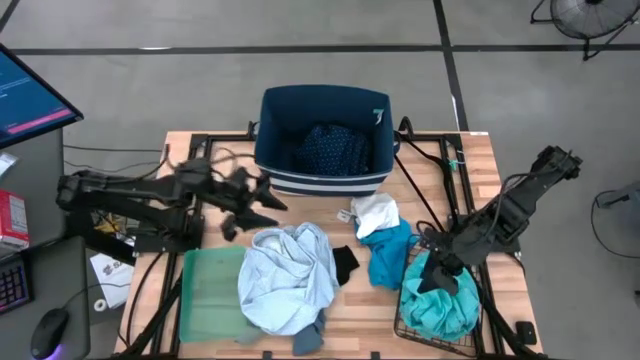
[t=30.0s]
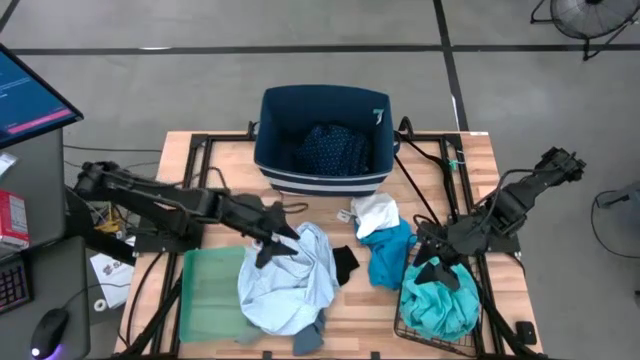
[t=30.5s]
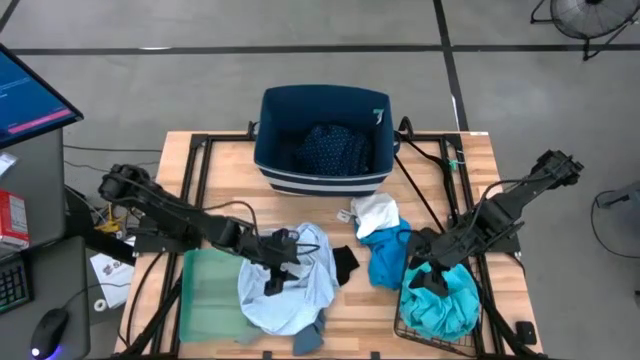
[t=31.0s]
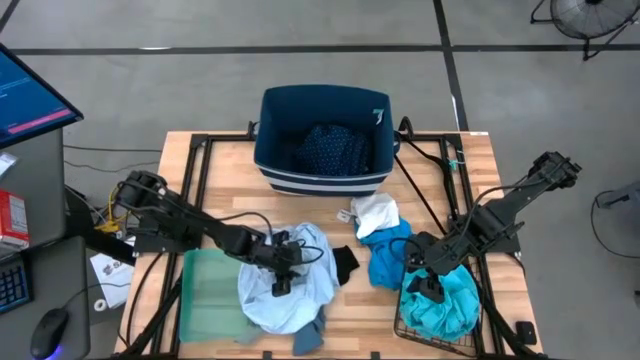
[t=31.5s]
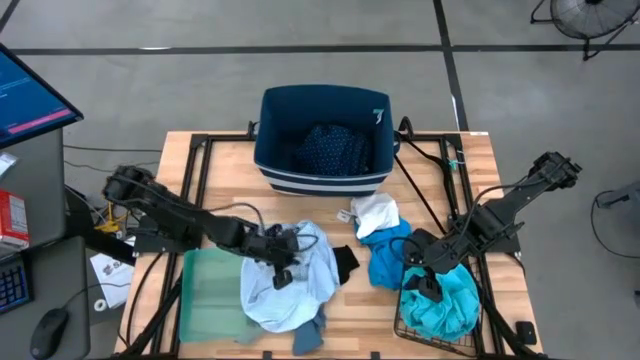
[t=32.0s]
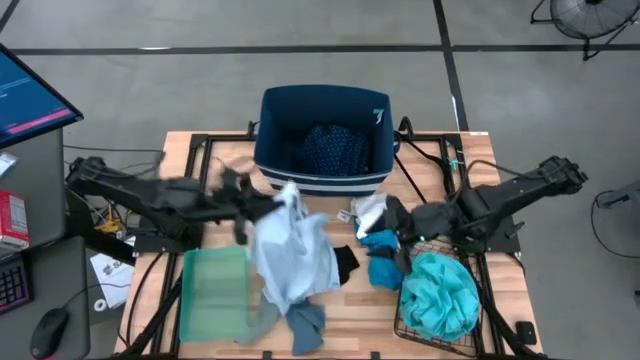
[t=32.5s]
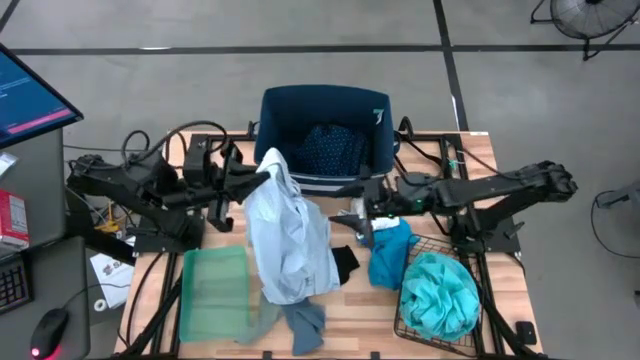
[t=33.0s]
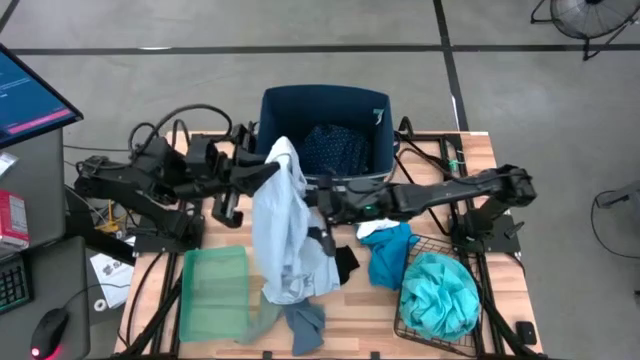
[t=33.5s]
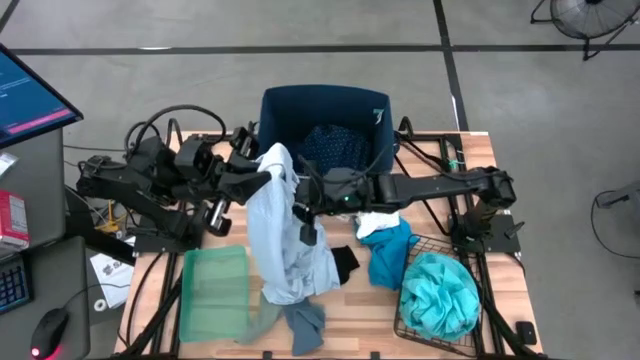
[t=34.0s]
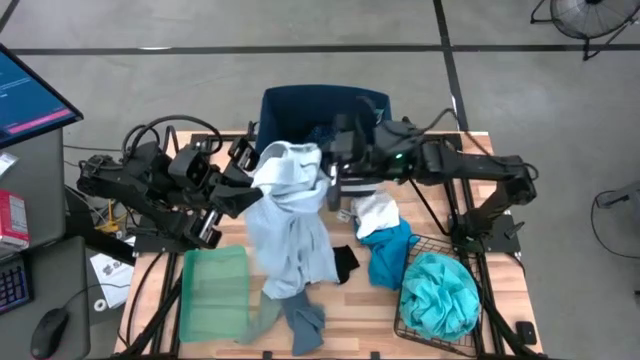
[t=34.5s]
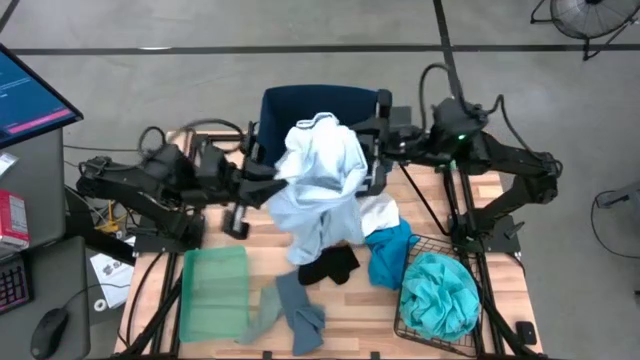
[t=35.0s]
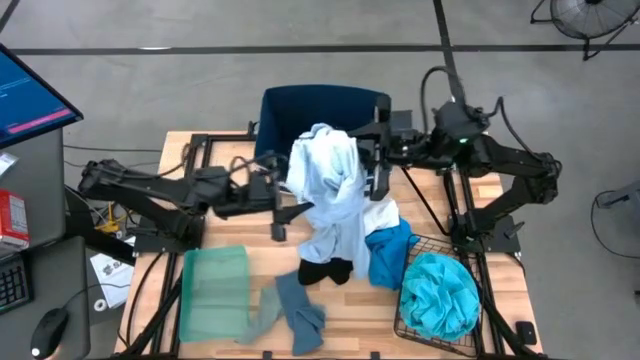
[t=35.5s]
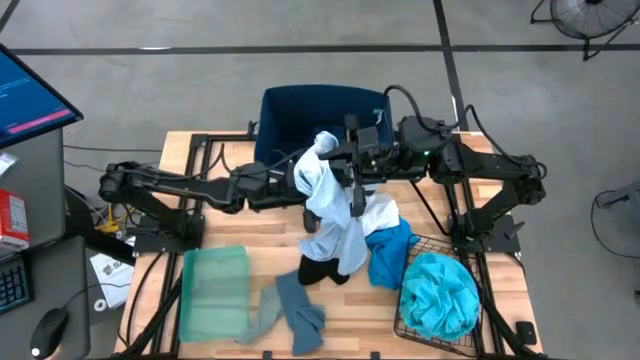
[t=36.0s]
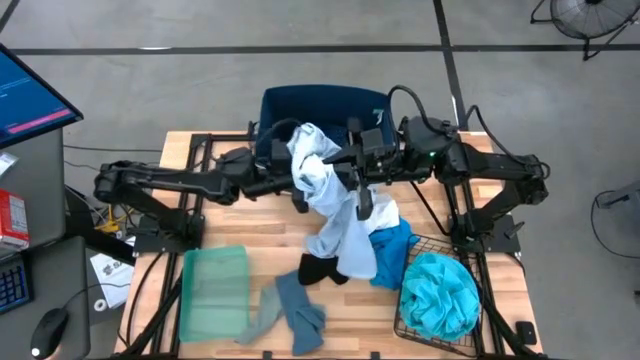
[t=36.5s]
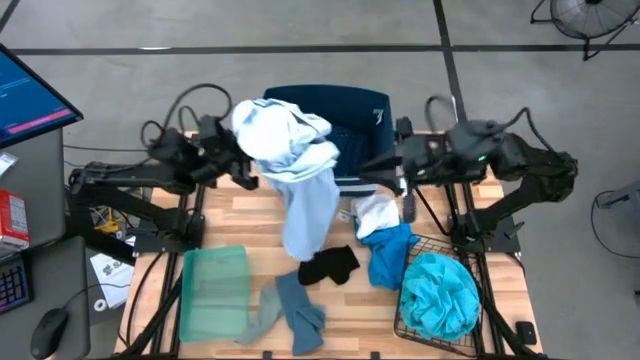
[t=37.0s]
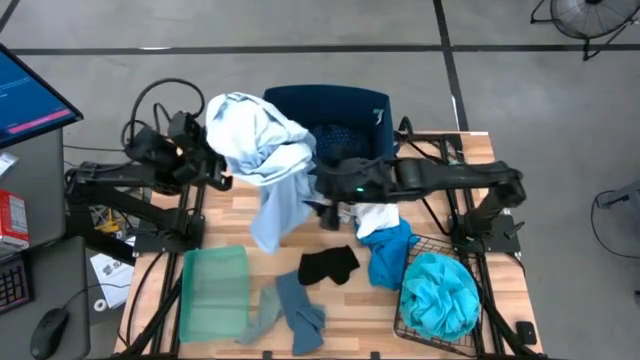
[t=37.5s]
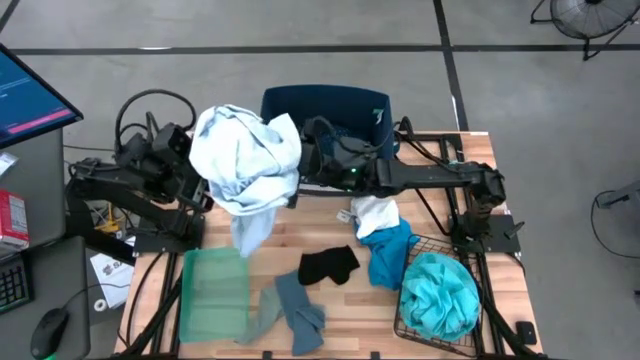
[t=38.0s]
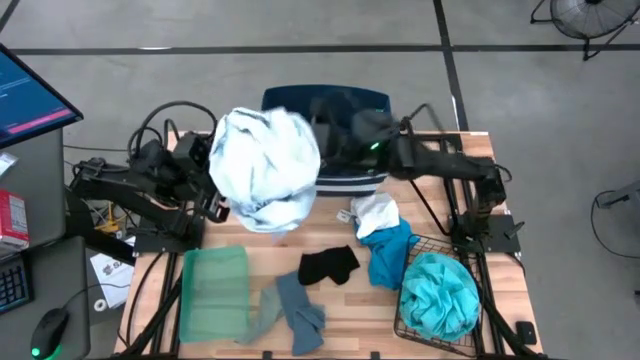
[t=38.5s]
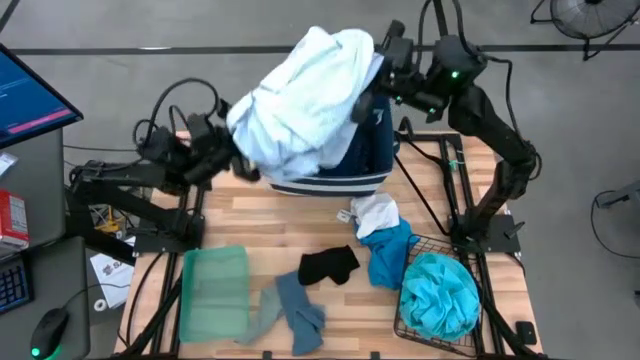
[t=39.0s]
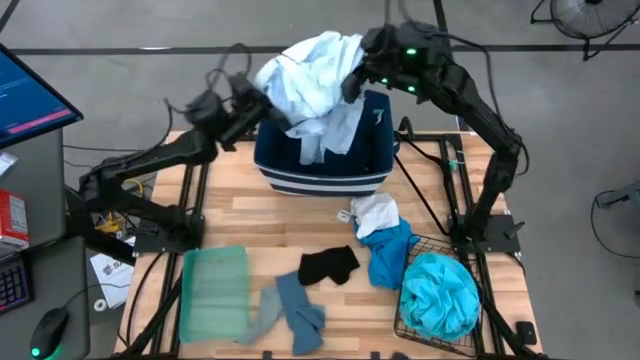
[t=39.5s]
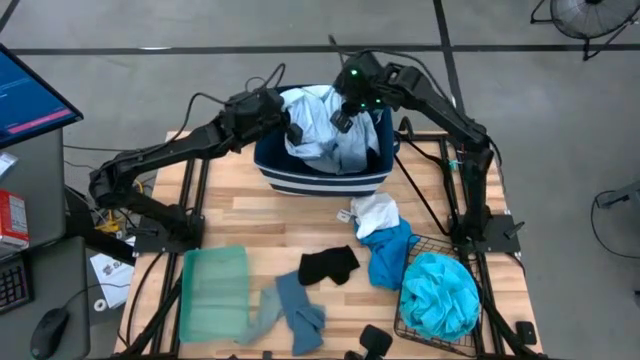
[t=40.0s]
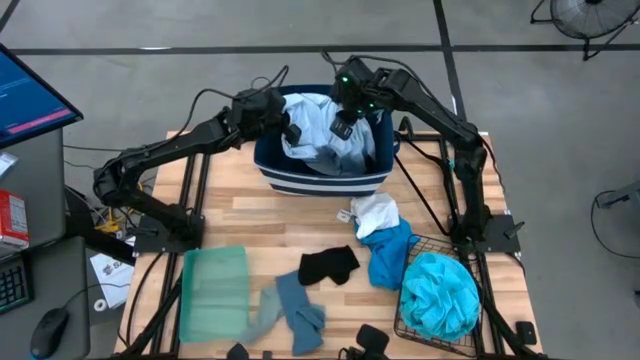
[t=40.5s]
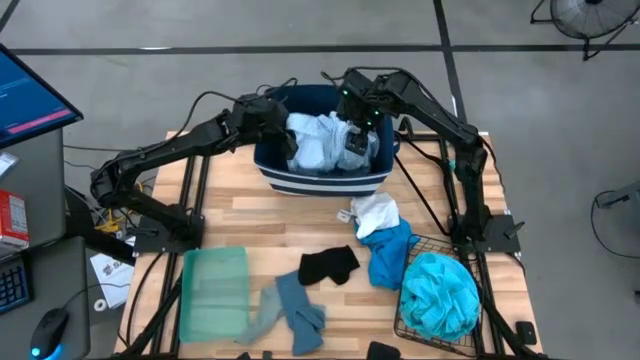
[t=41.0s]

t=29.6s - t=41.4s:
Task: Pick & Place Cloths
Put the blue polo into the blue bin

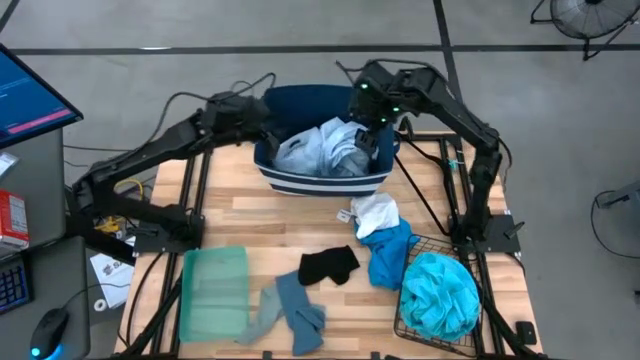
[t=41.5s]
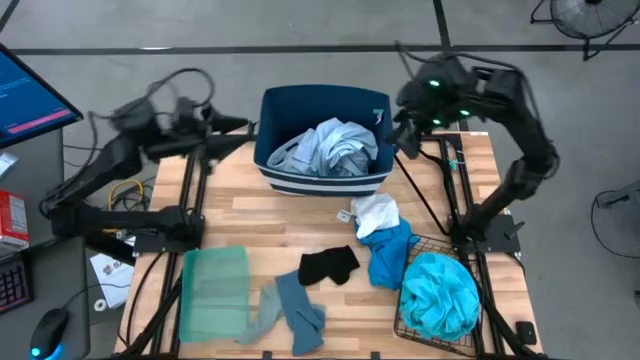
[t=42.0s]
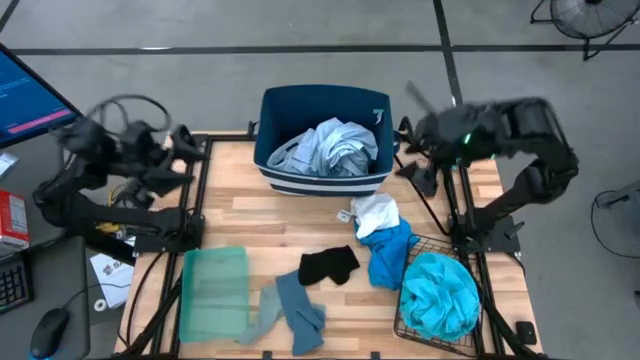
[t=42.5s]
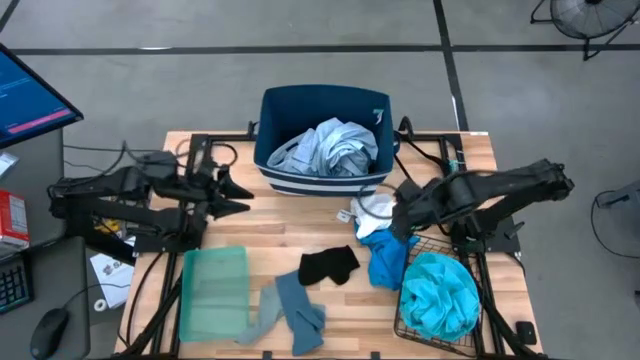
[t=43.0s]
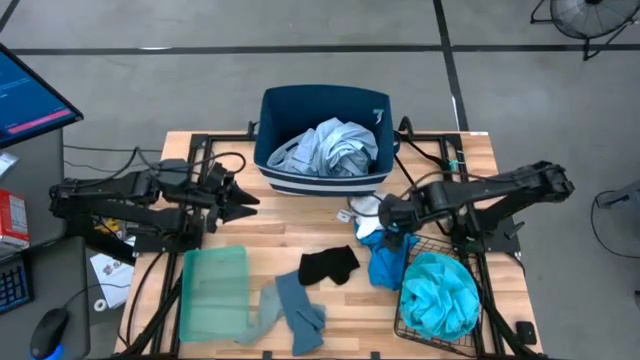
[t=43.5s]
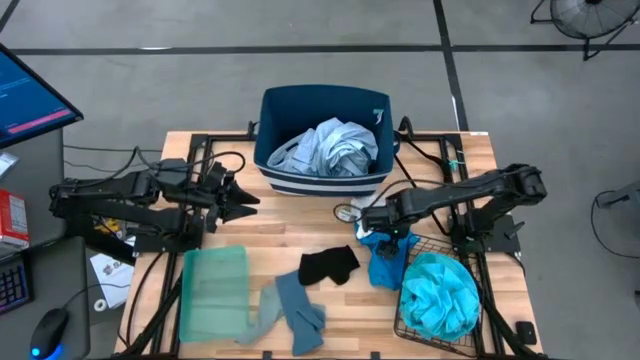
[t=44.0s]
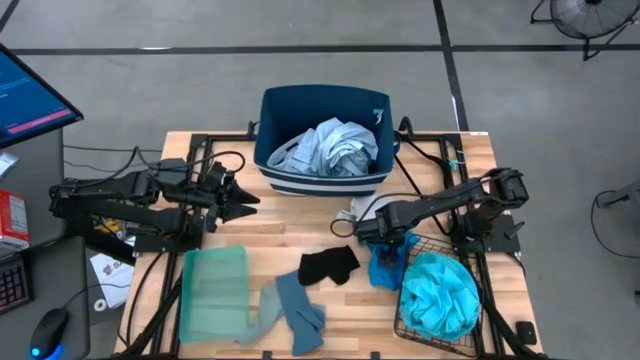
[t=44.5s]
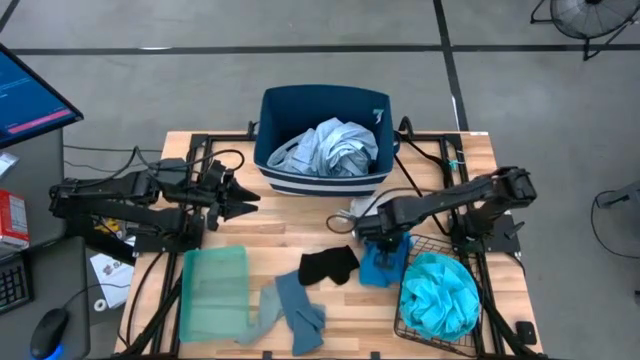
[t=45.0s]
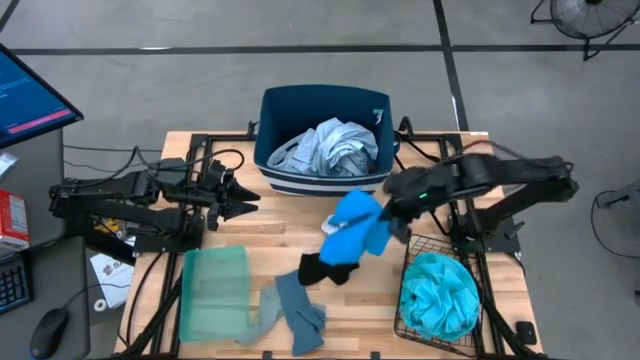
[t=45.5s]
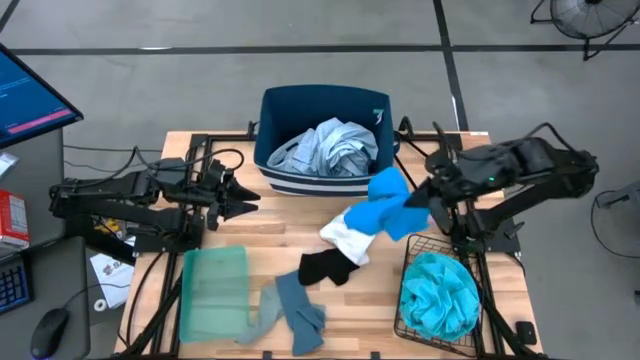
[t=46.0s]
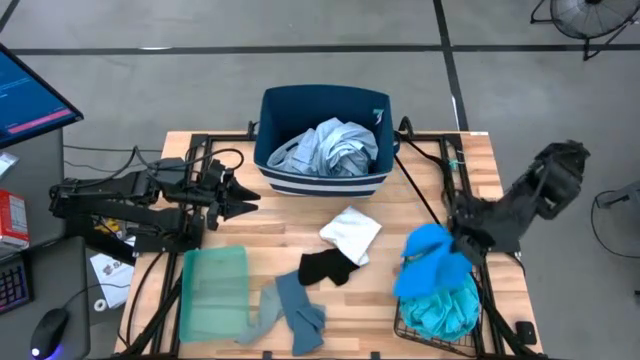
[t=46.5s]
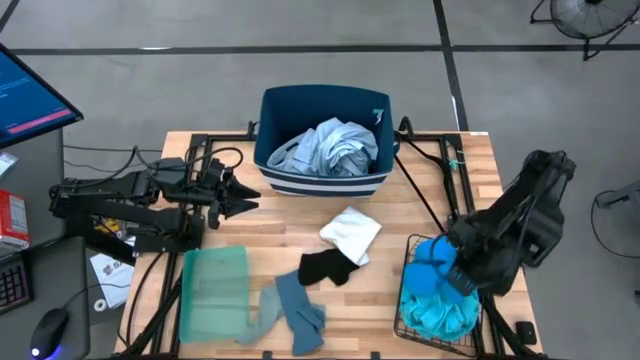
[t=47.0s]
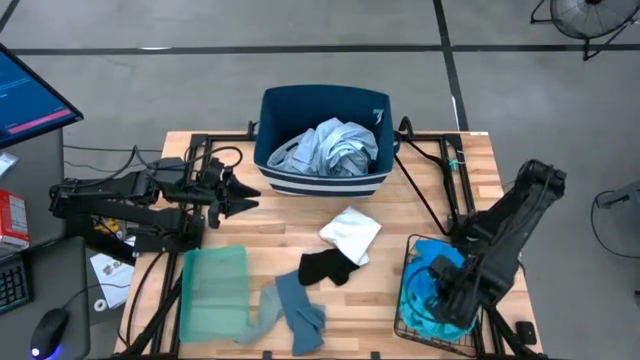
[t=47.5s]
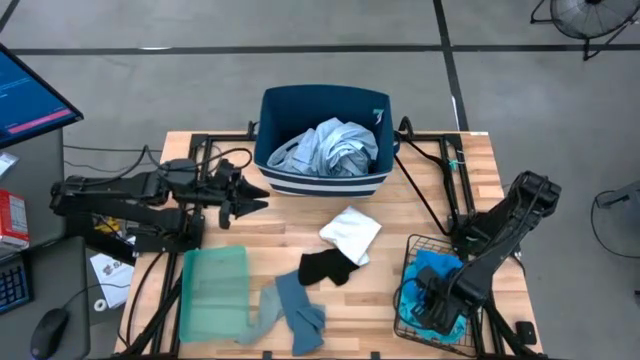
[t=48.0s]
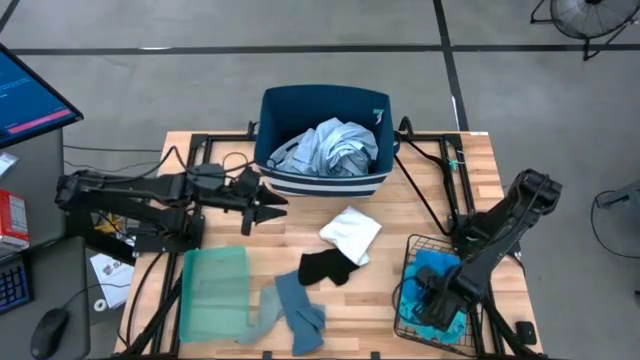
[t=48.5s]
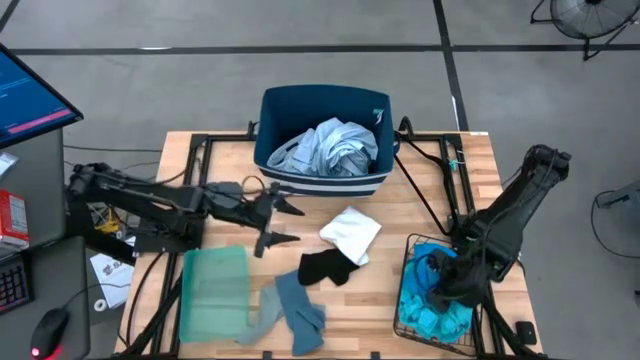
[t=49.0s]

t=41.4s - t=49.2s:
Put the blue shorts into the wire basket

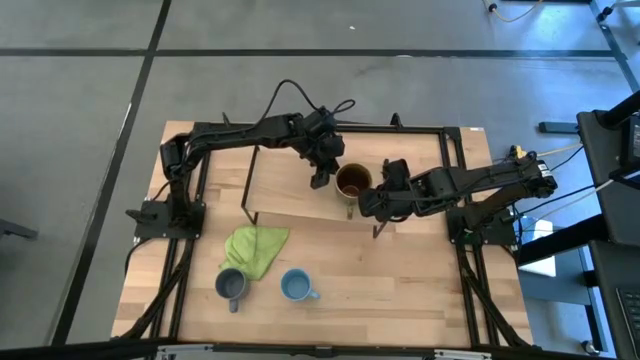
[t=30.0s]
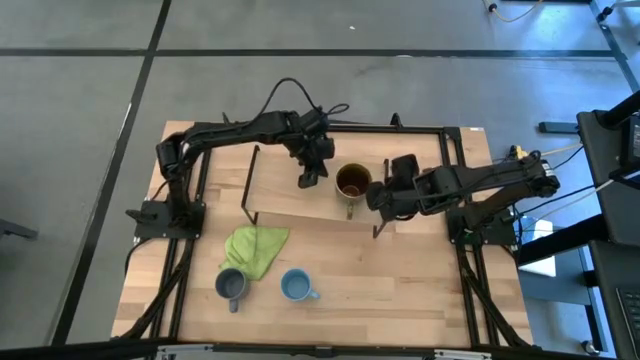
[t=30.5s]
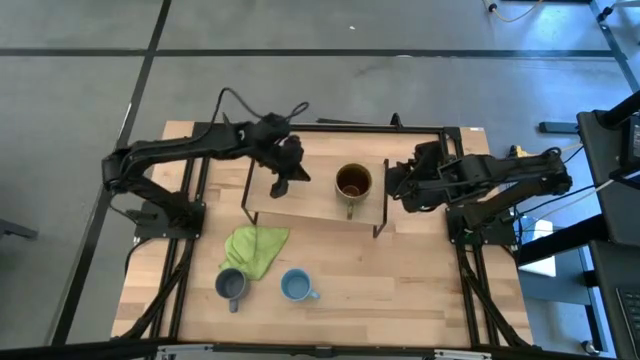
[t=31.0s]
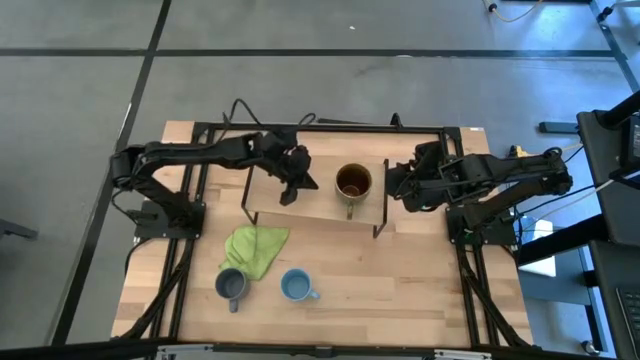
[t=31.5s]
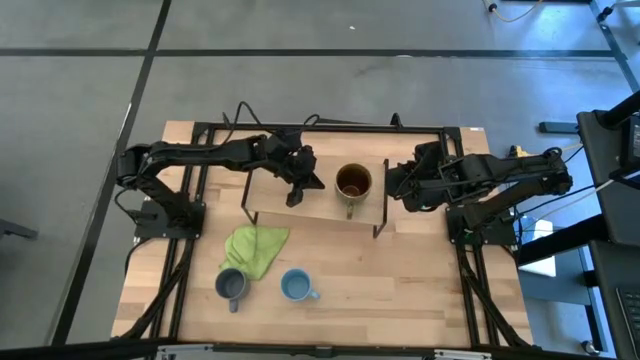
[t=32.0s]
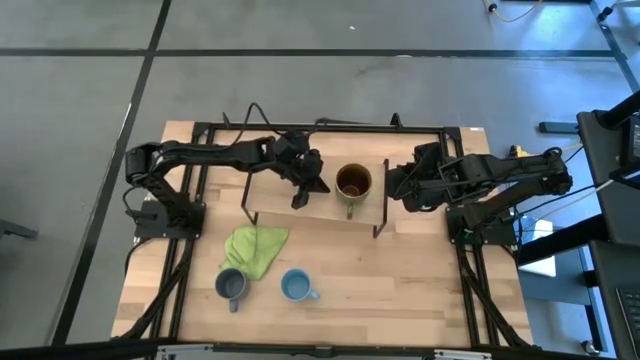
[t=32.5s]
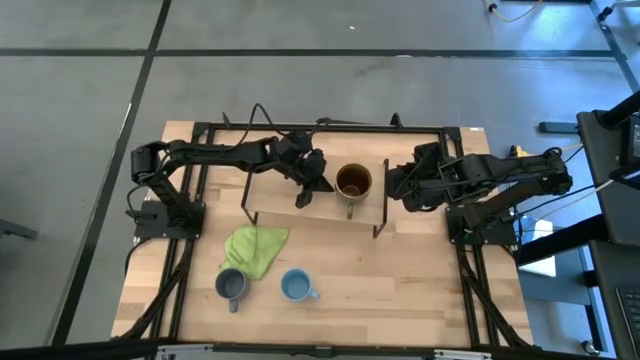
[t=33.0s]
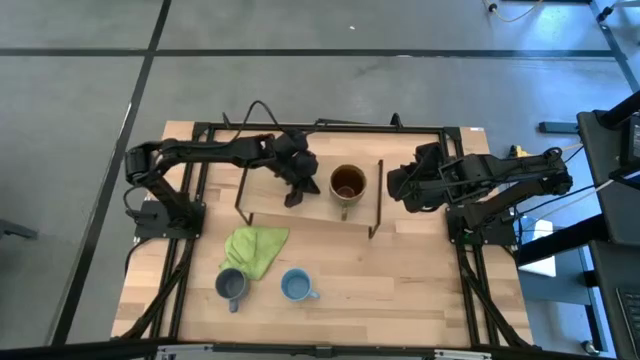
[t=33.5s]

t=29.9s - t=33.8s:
Task: Stack small to large cups/mugs on shelf
Adjust the shelf
